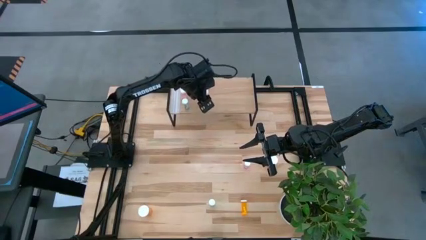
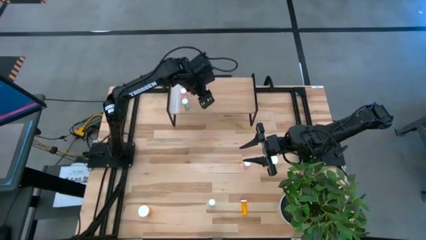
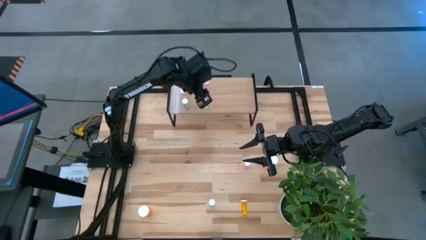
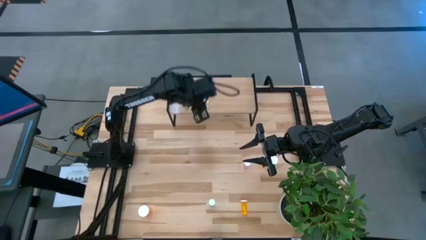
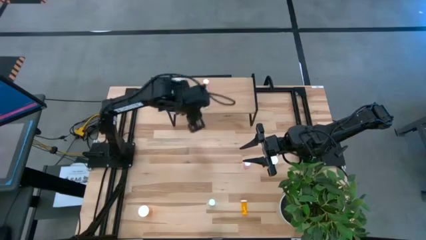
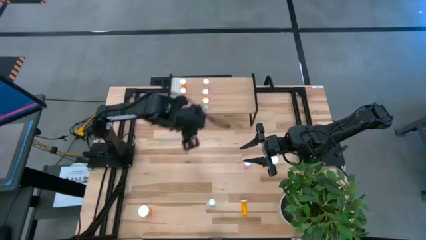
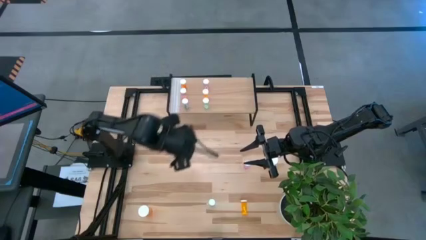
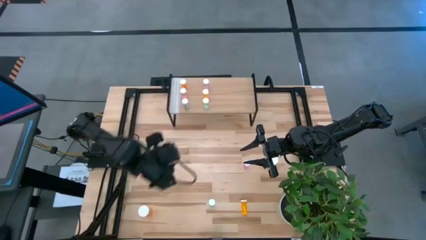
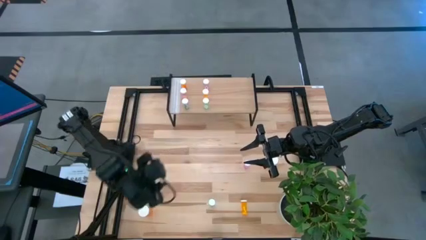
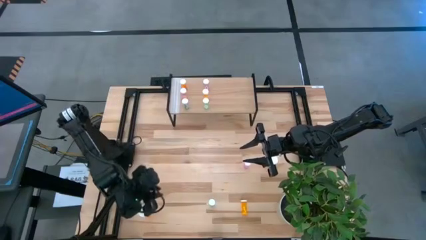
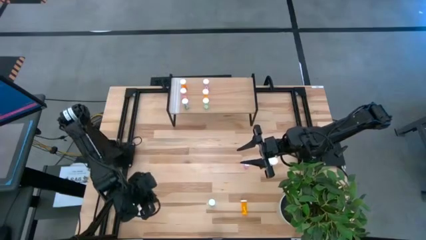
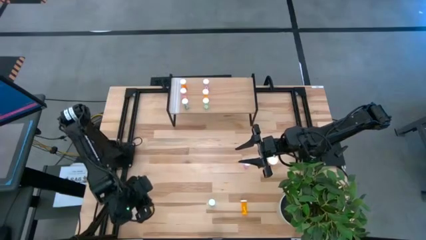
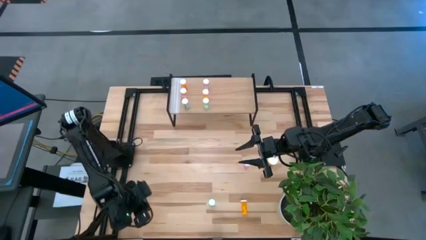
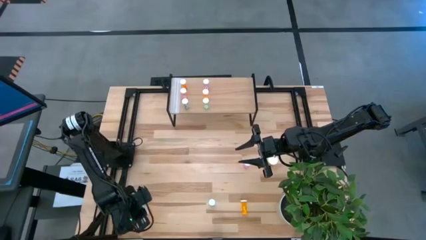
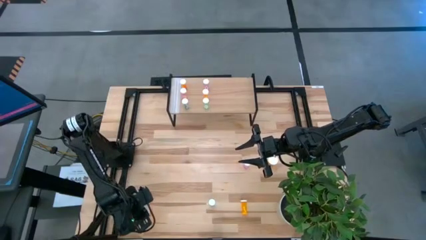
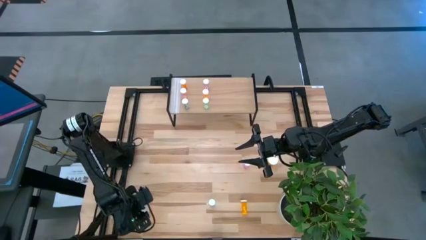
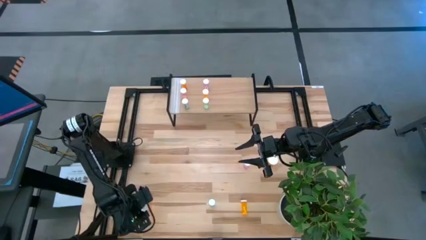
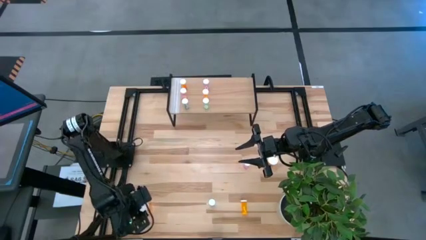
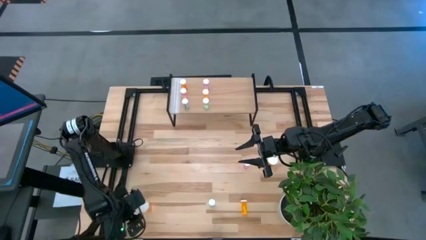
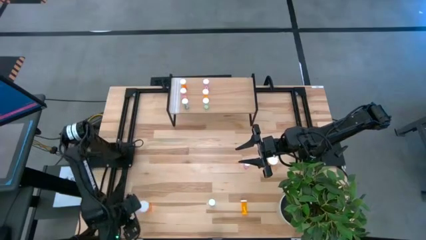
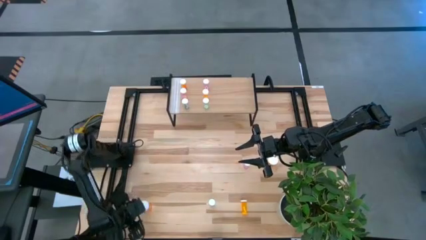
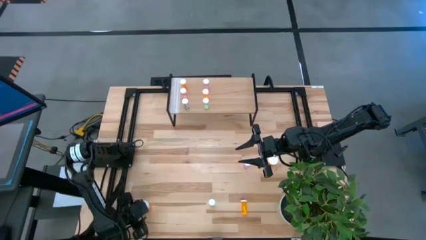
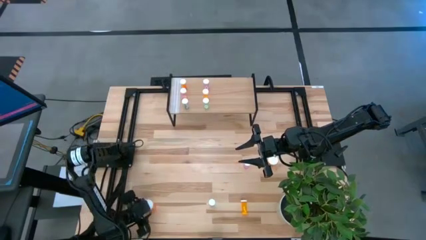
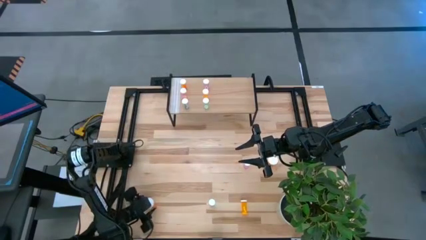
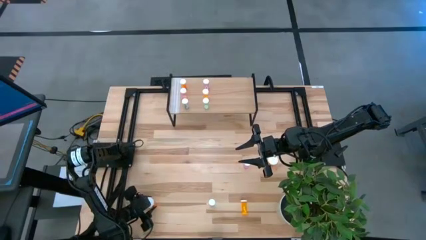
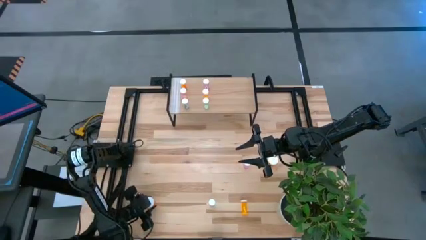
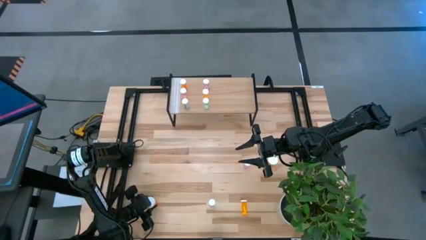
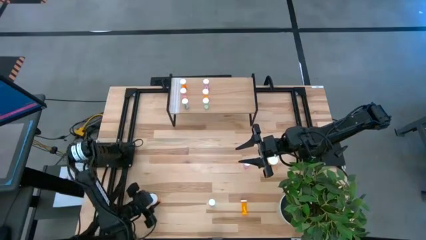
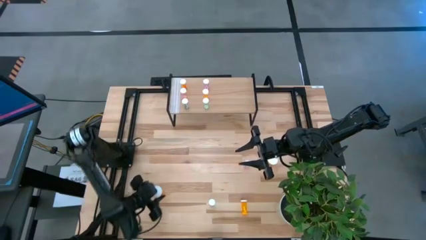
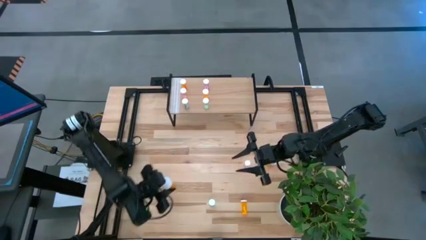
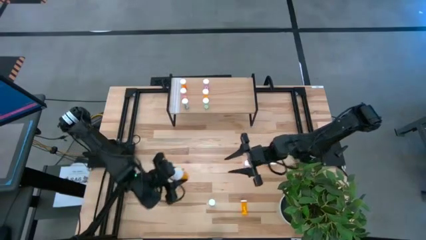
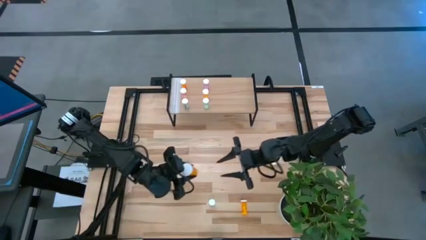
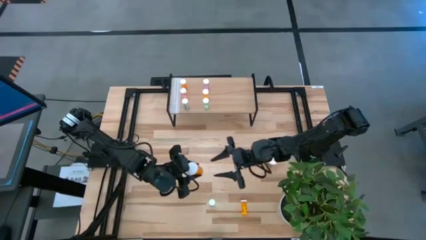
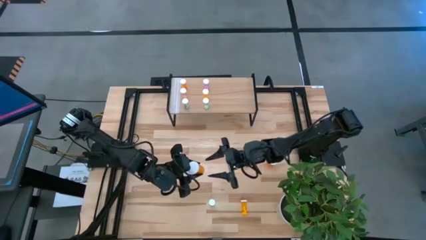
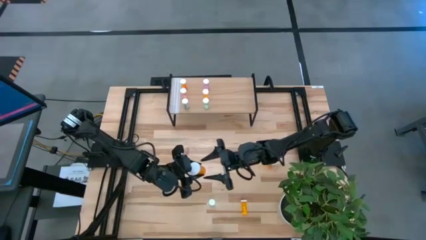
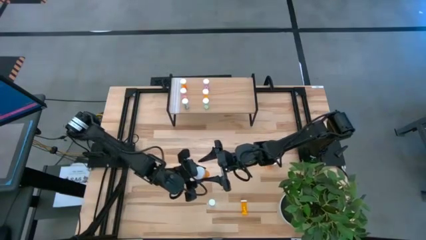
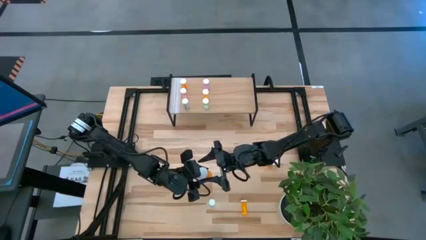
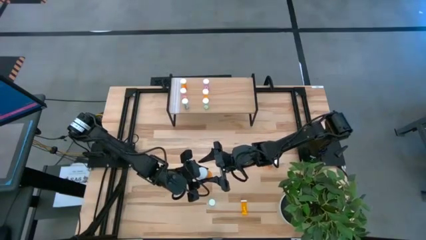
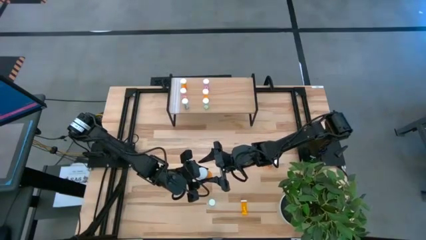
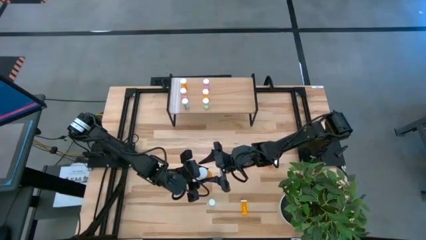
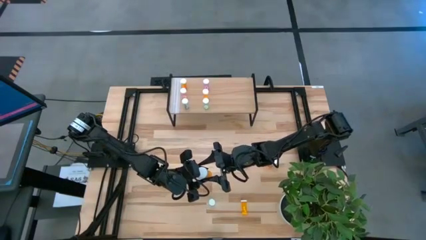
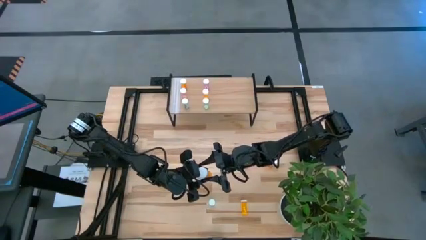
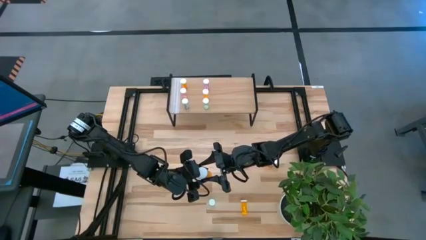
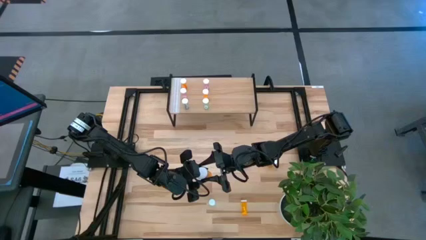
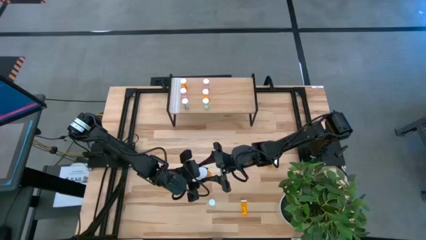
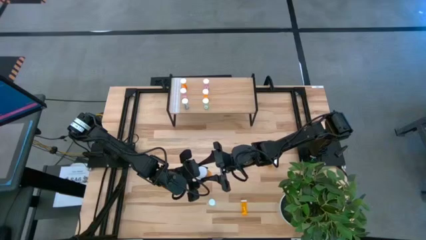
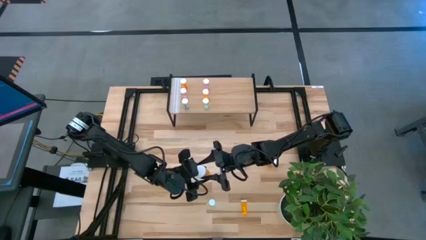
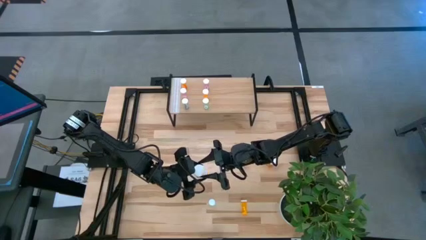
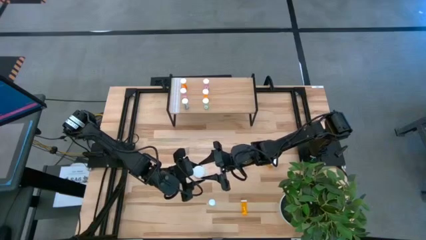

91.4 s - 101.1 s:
Task: Pick and place medicine bottles onto shelf by color
Put the bottom large orange pill bottle on the shelf

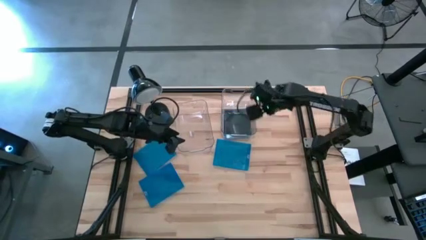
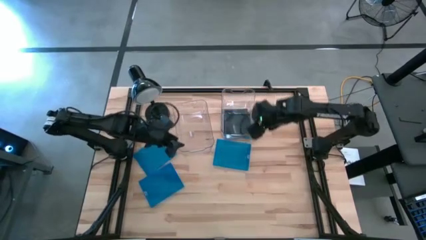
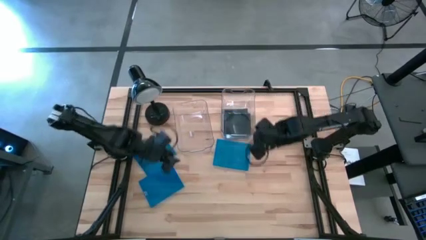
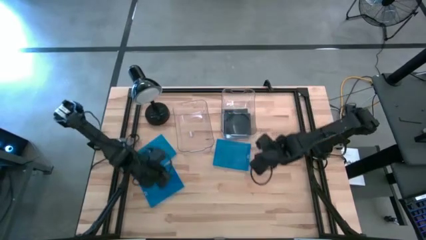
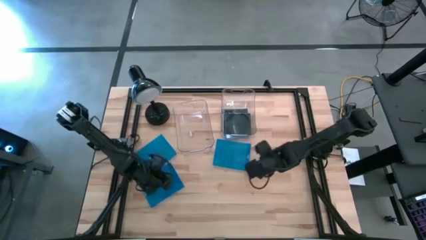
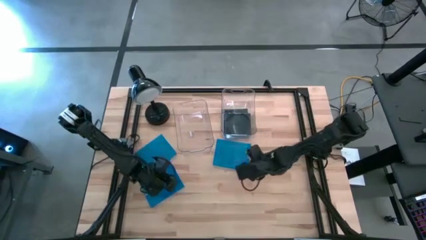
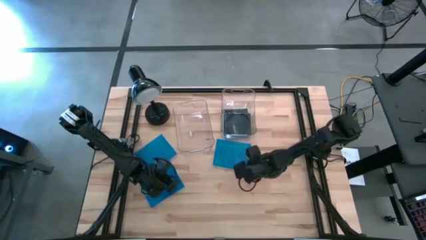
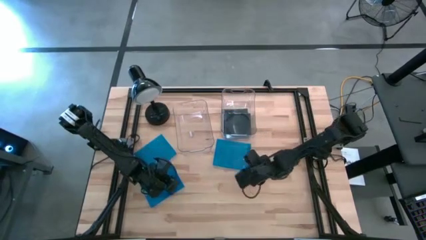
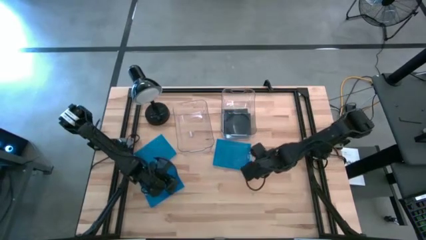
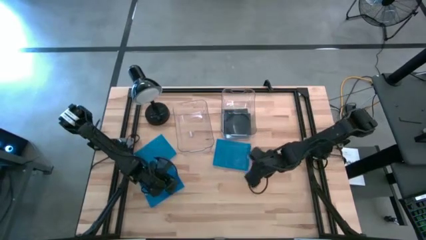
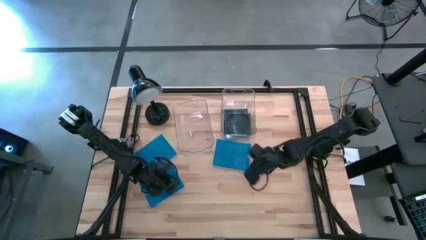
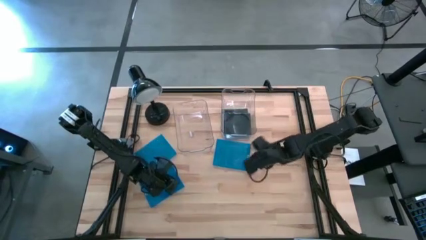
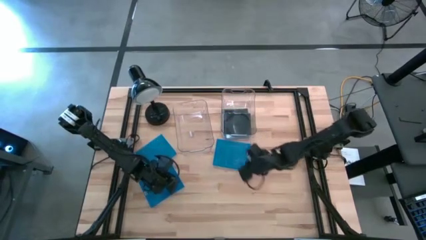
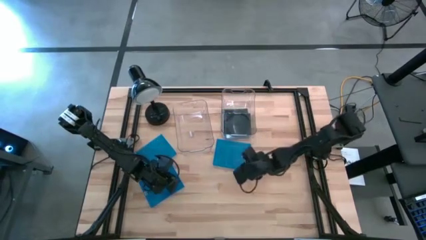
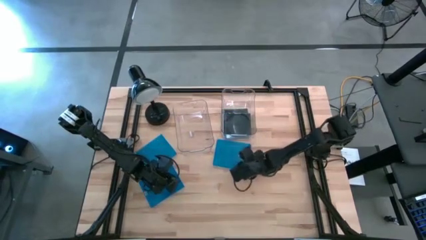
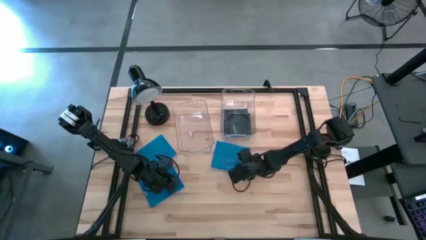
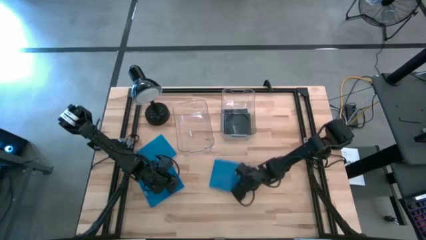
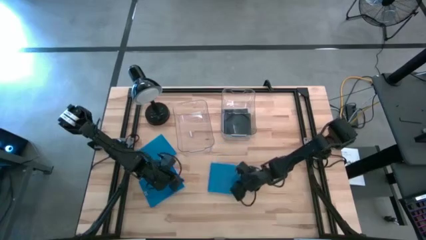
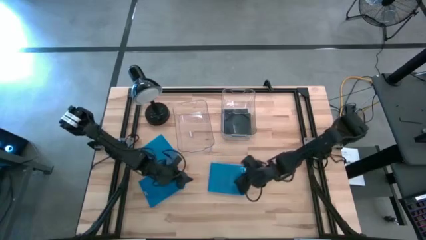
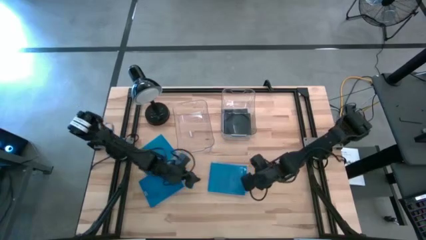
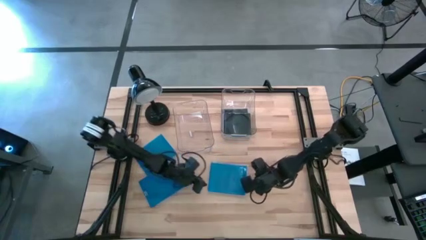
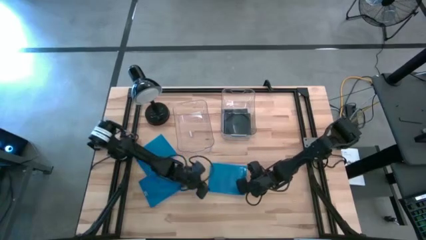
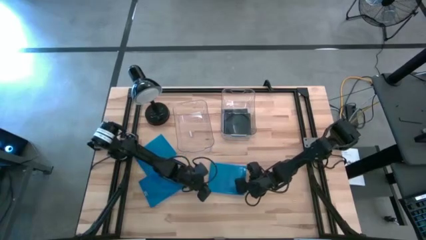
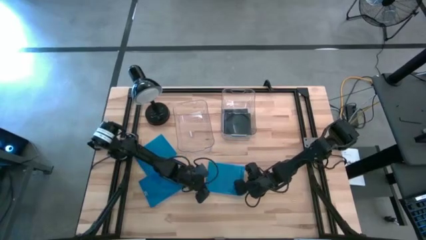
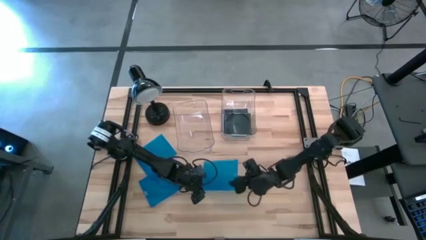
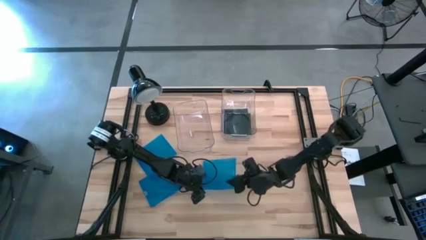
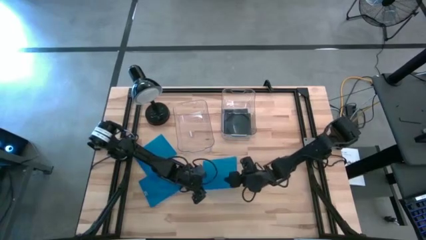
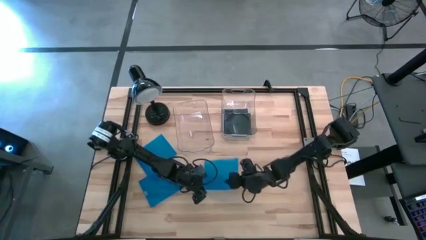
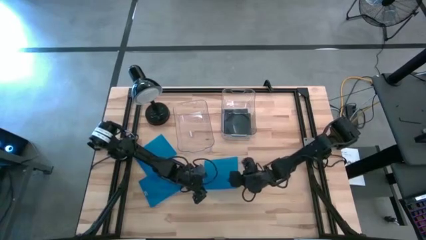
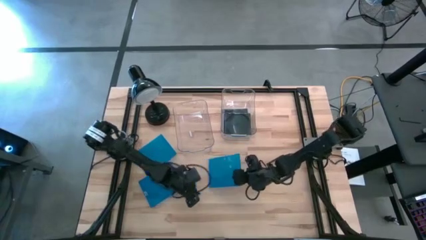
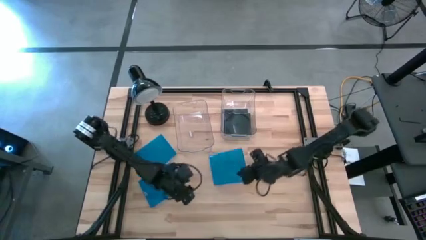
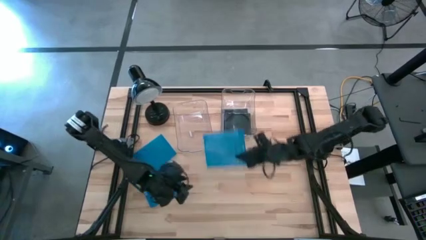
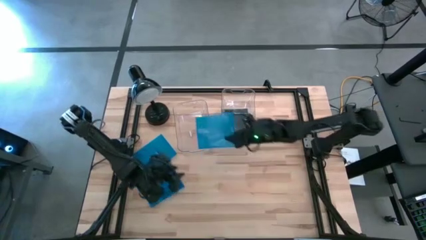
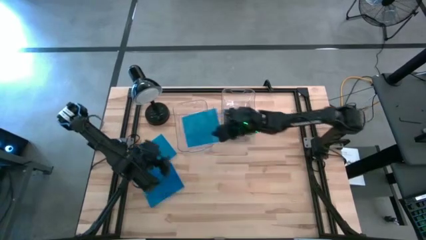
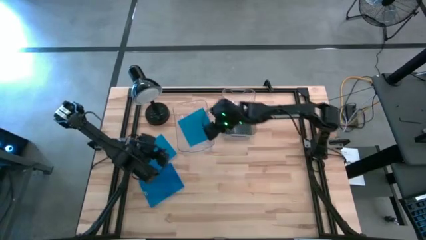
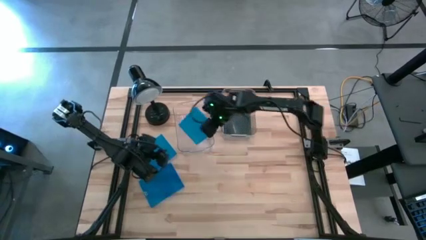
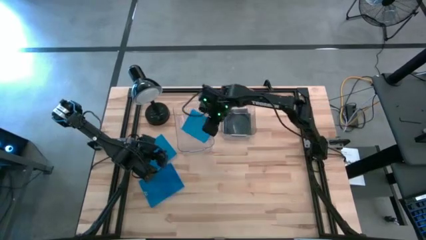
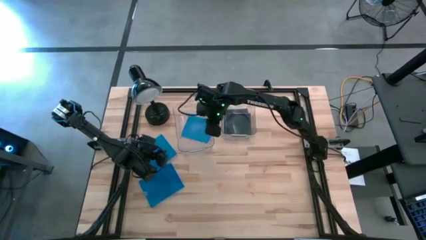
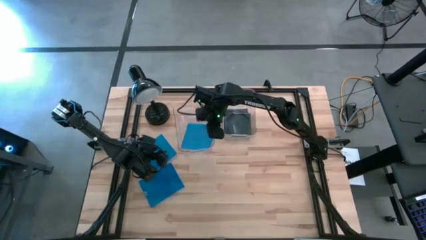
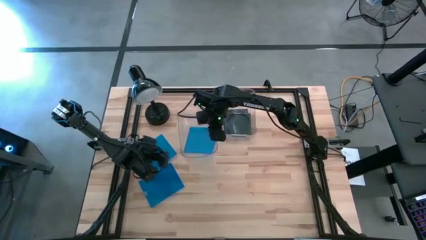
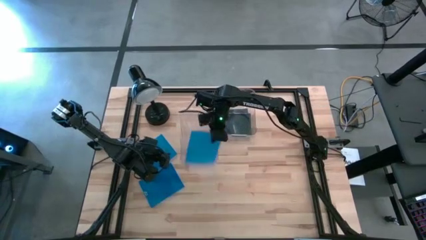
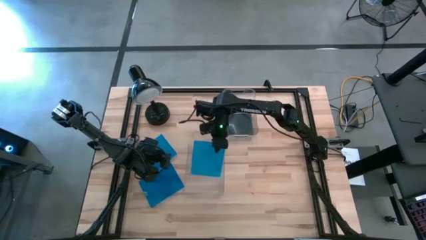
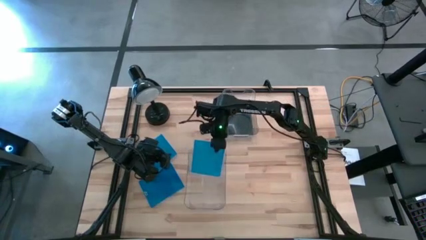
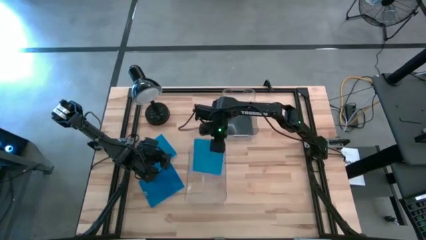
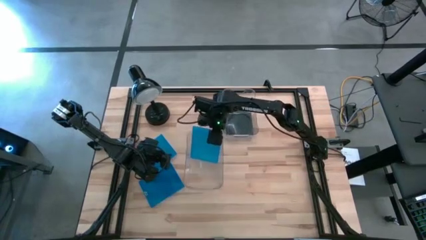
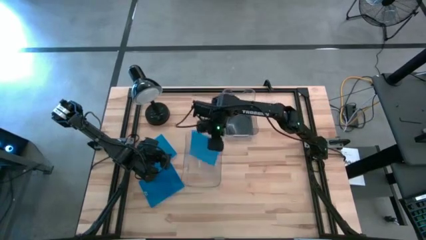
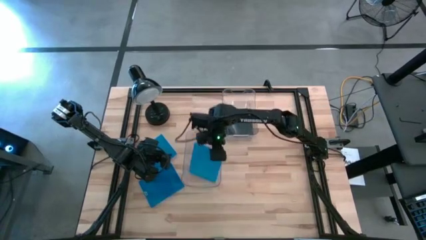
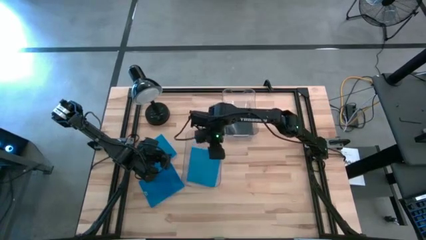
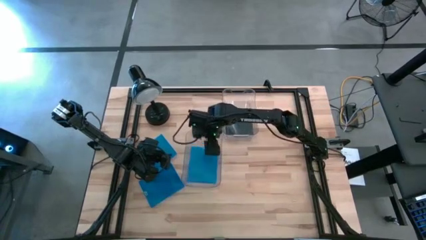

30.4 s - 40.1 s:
Task: Pick & place jewel cases by type
Put the top right blue CD case into the left transparent bin
